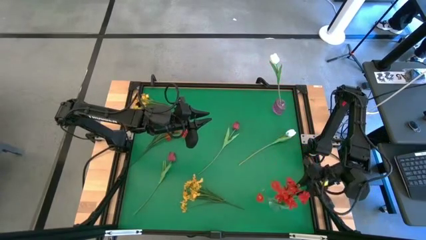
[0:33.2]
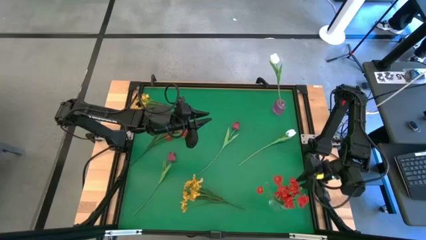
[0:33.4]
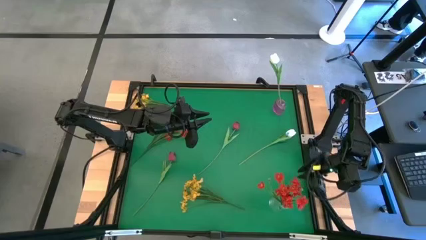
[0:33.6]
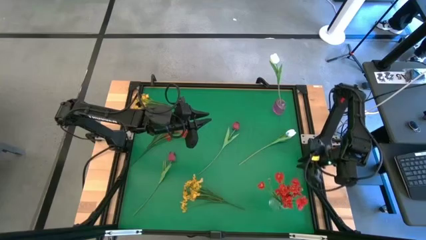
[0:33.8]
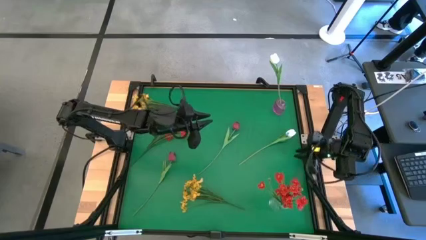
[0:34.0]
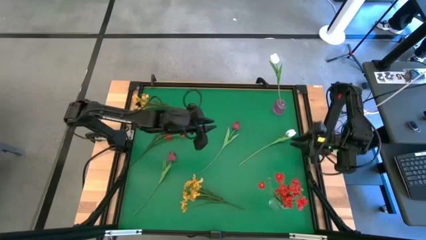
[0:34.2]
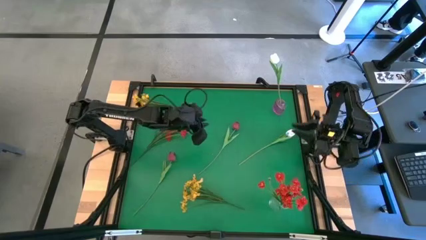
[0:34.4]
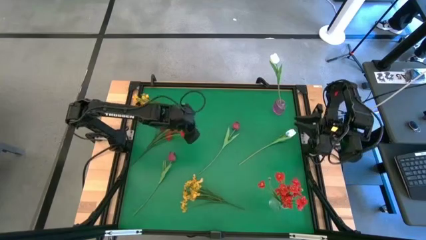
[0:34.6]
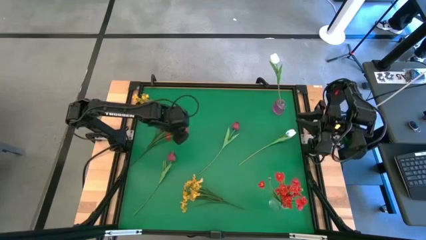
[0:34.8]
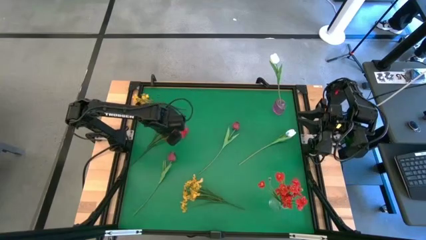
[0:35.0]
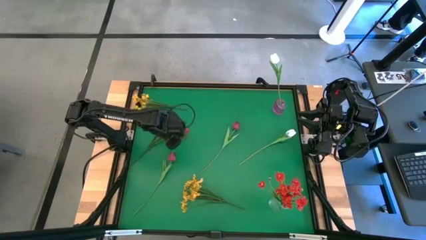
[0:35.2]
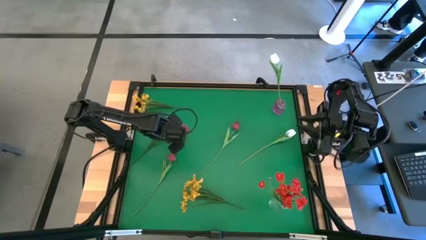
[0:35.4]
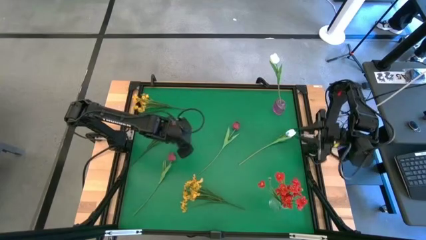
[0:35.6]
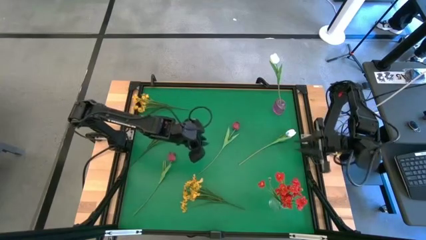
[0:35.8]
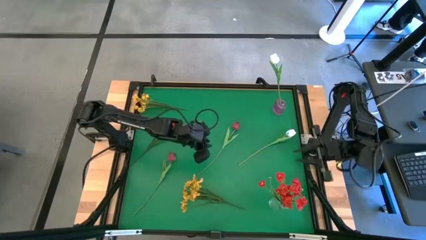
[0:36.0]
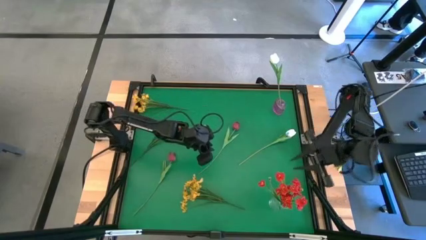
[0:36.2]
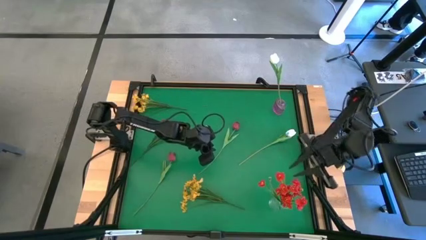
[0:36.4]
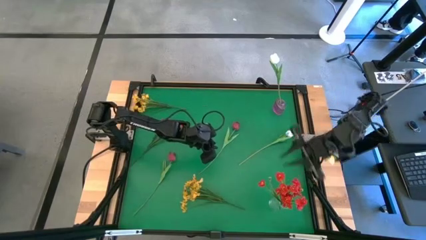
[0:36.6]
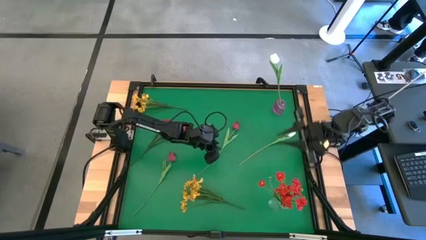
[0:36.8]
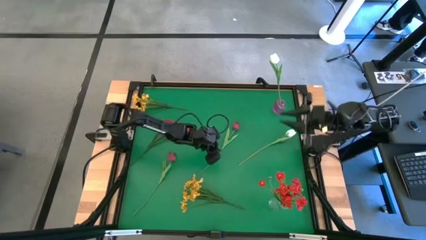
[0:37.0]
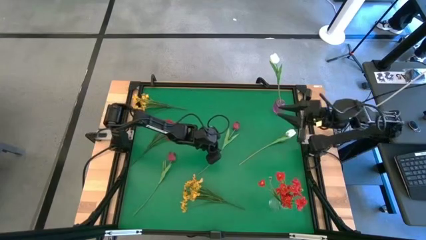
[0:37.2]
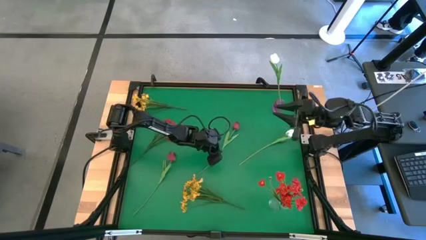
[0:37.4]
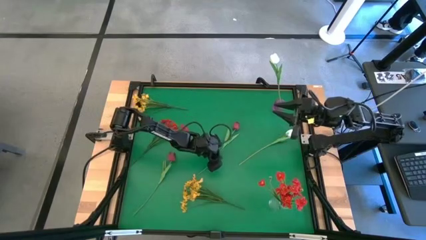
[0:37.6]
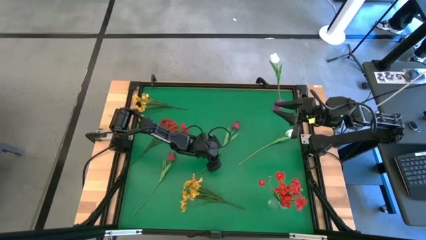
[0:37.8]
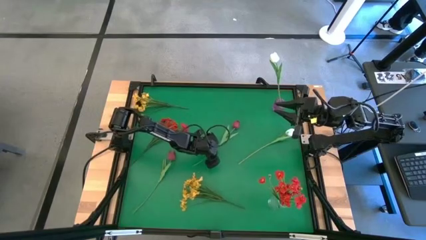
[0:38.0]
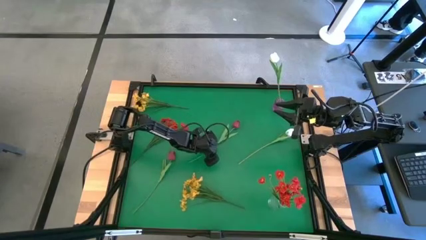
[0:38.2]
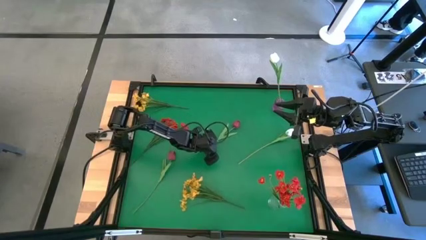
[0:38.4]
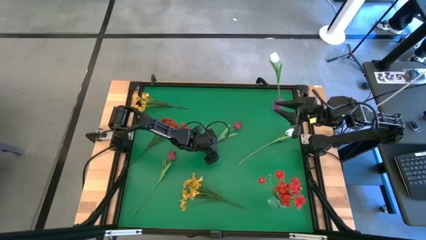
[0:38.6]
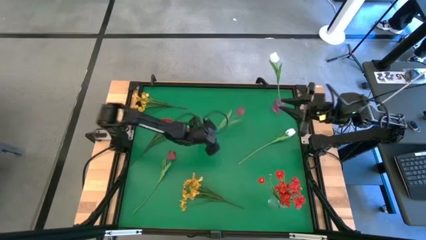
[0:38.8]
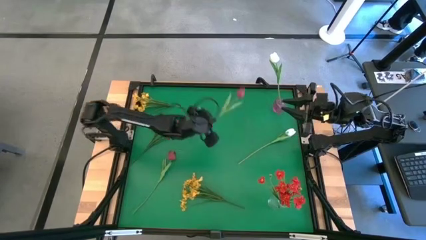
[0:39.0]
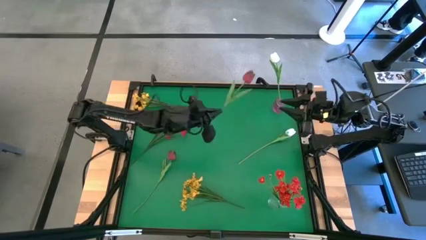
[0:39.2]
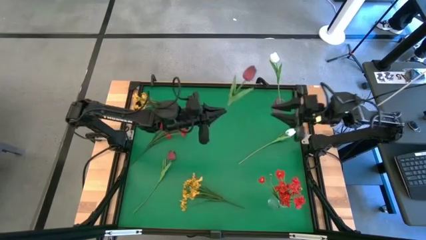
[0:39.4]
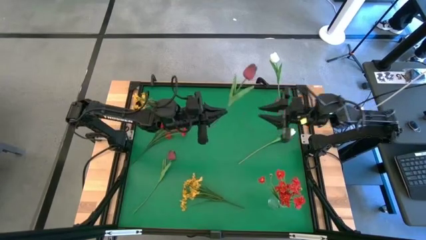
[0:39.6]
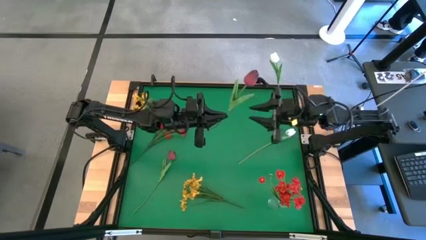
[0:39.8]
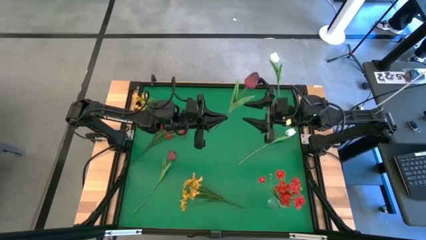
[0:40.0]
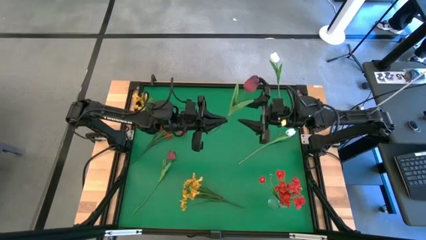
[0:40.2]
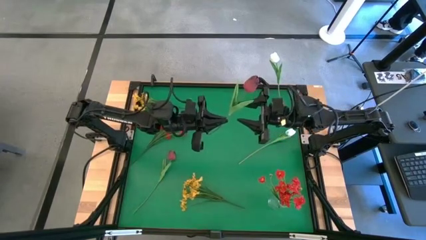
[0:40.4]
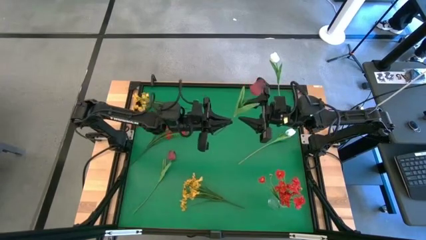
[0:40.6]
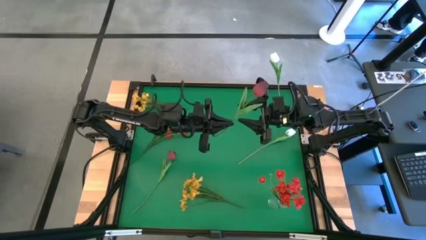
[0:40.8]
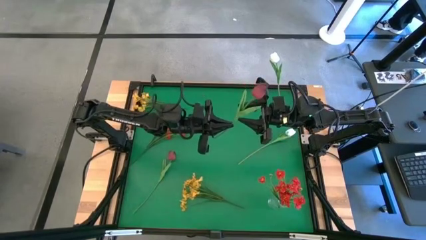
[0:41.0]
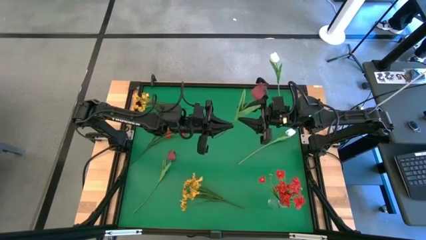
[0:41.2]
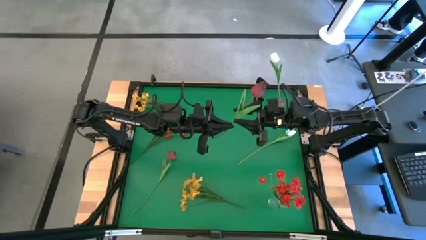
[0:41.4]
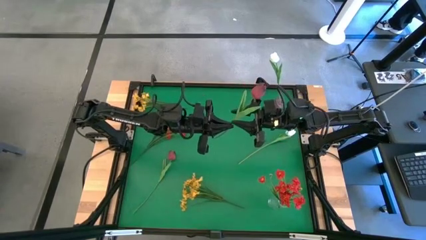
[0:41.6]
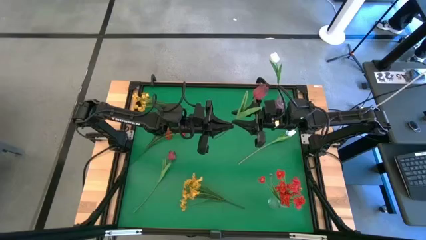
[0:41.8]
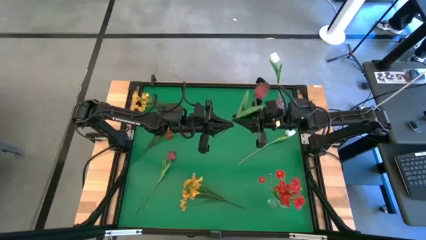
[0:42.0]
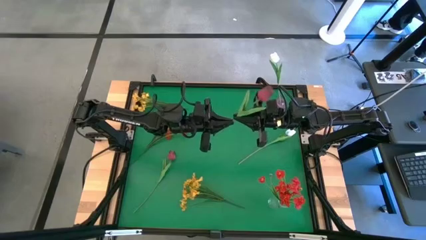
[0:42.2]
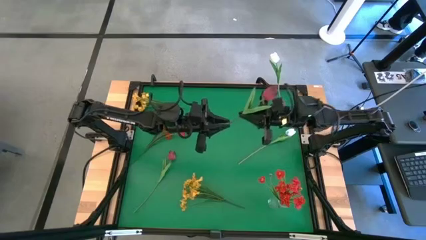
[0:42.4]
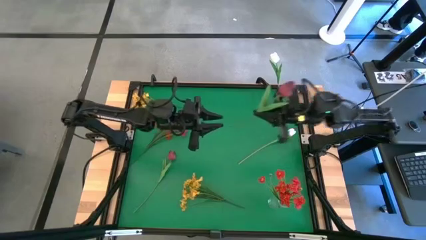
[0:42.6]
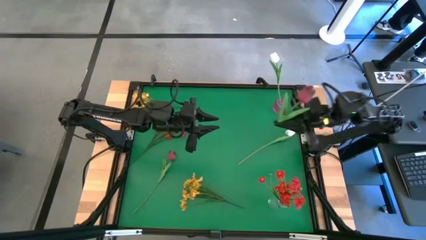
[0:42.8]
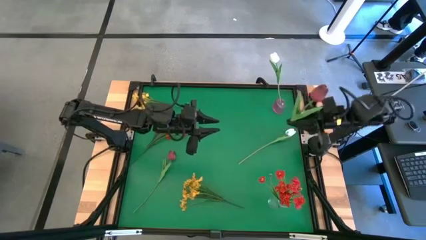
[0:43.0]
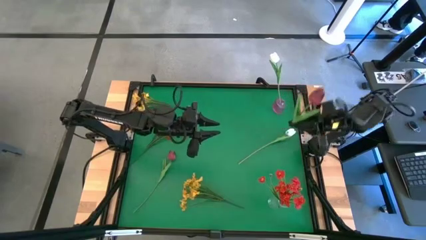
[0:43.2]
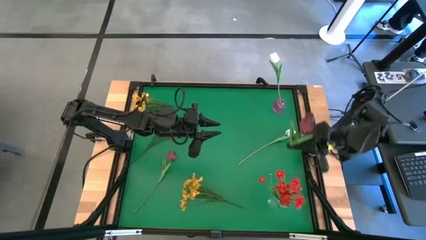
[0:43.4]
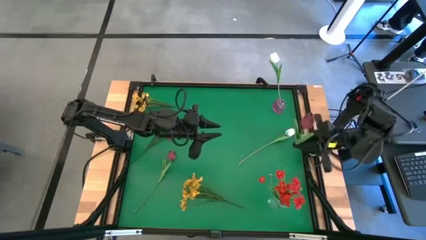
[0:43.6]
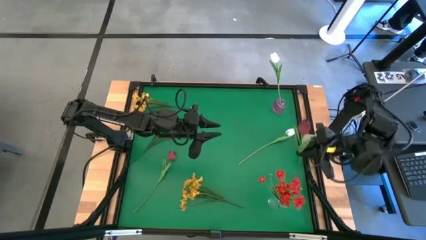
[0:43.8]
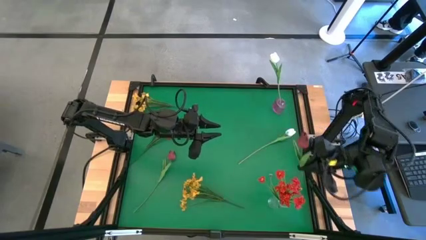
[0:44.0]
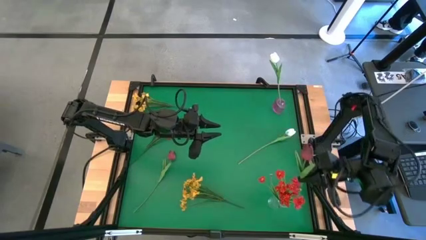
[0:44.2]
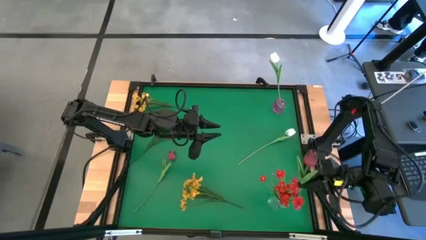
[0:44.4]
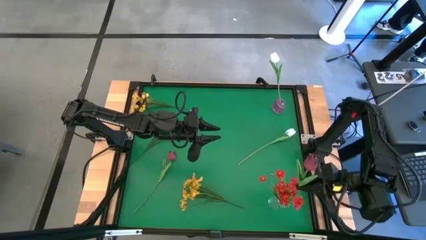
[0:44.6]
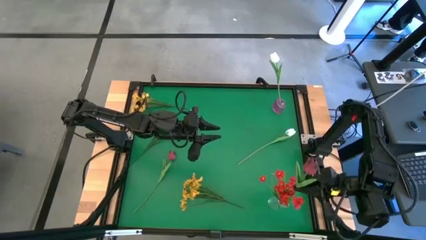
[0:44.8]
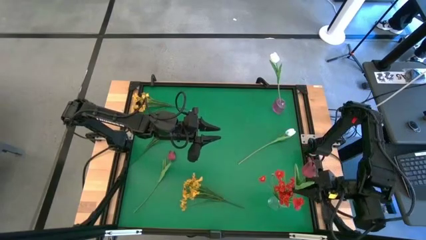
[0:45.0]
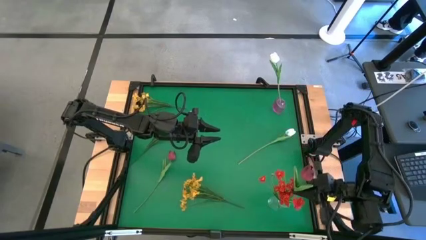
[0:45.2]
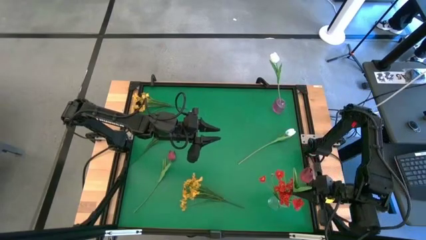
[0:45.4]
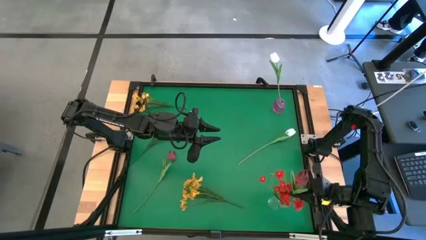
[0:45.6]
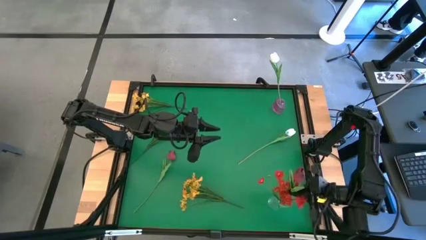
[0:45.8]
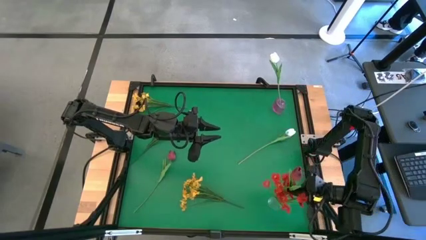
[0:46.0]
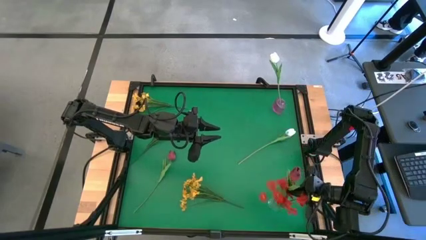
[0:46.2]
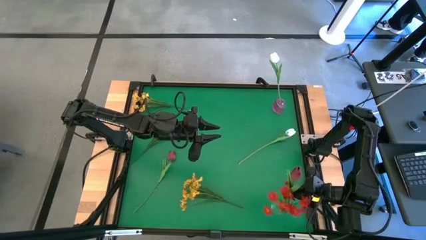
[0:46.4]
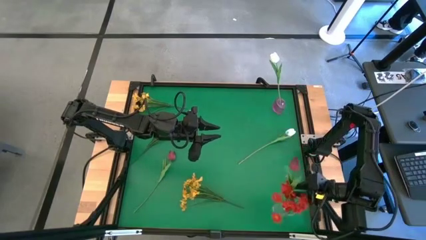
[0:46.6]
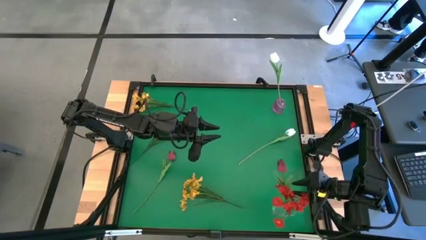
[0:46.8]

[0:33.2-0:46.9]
Task: Sort flowers into vase by color
Put the right red tulip into the transparent vase
